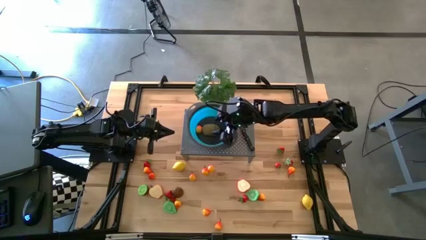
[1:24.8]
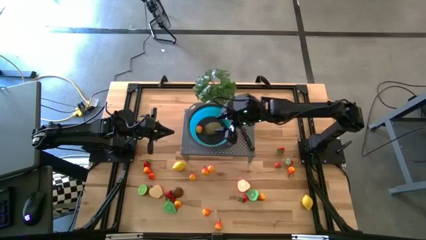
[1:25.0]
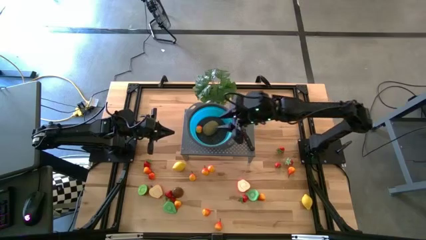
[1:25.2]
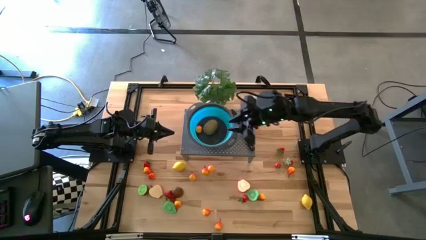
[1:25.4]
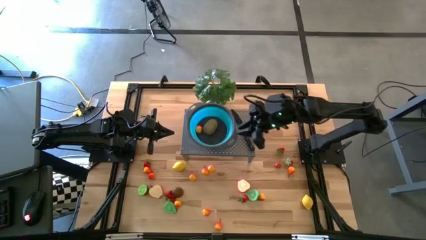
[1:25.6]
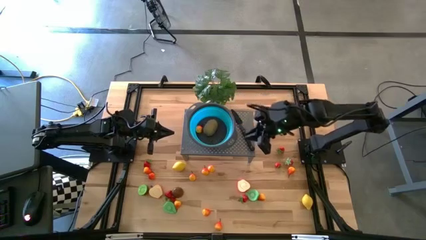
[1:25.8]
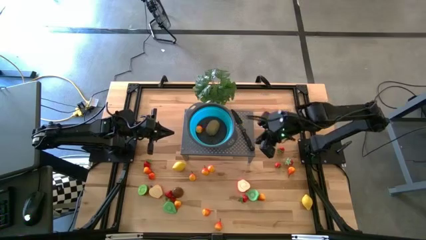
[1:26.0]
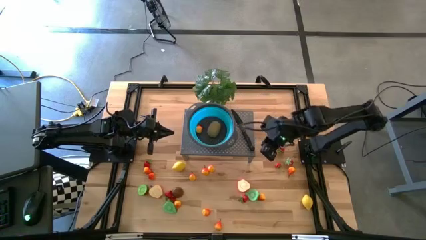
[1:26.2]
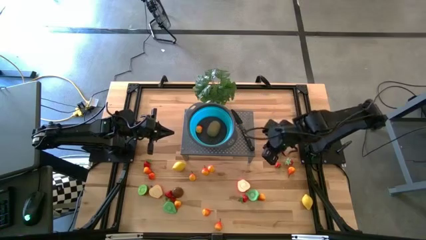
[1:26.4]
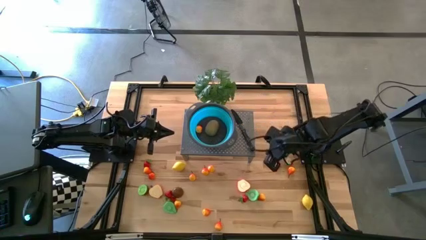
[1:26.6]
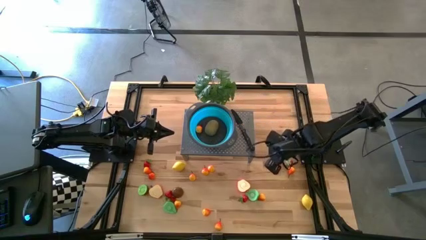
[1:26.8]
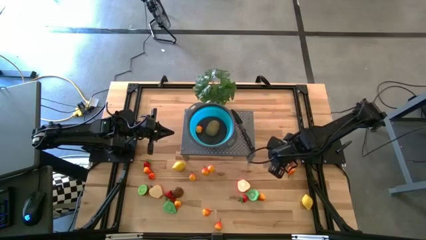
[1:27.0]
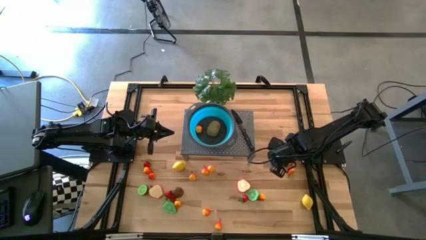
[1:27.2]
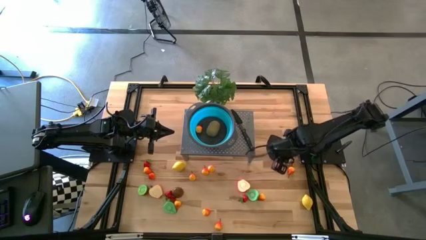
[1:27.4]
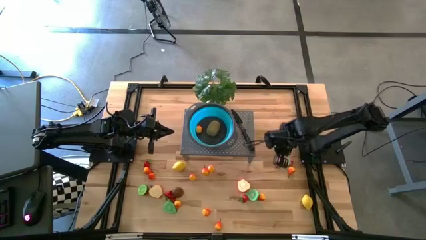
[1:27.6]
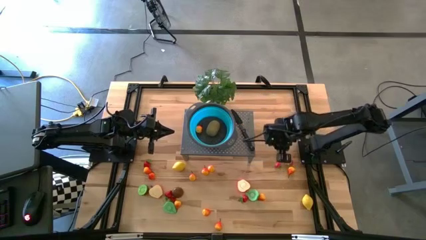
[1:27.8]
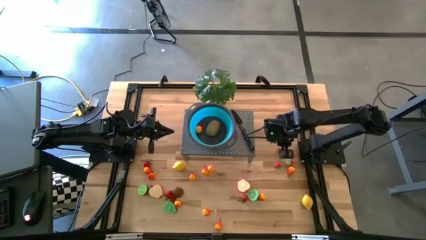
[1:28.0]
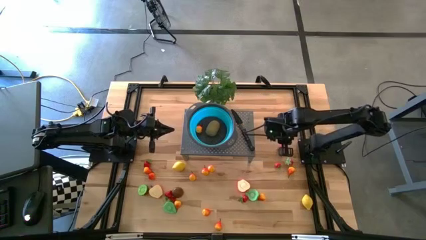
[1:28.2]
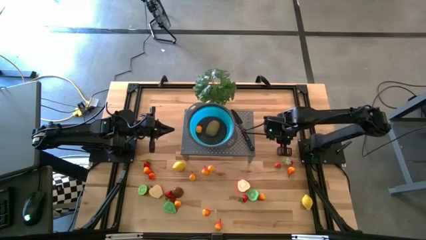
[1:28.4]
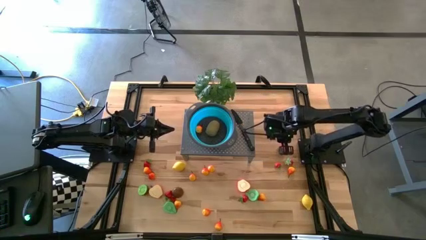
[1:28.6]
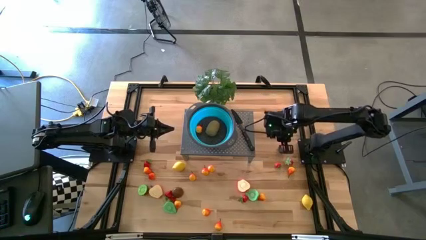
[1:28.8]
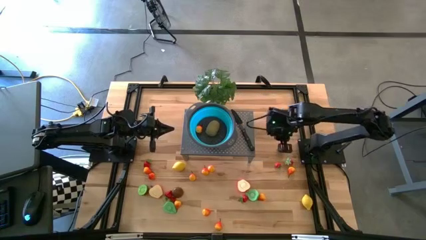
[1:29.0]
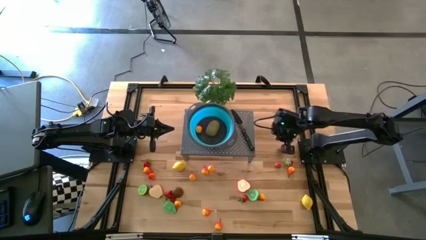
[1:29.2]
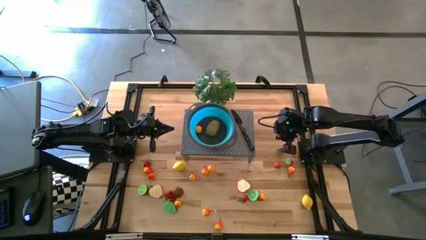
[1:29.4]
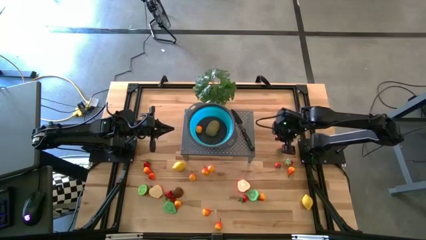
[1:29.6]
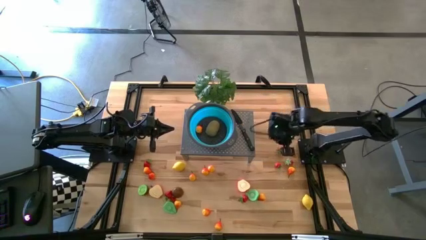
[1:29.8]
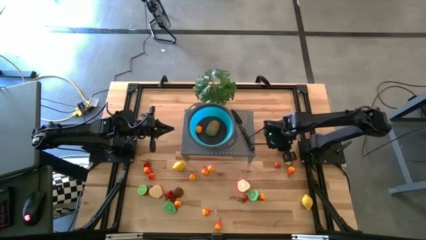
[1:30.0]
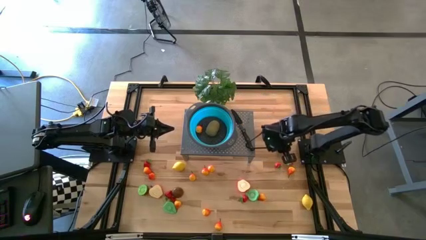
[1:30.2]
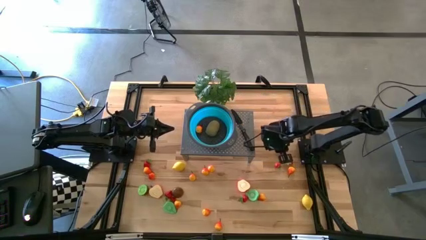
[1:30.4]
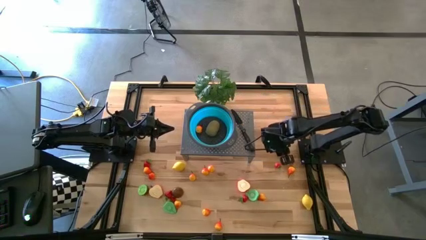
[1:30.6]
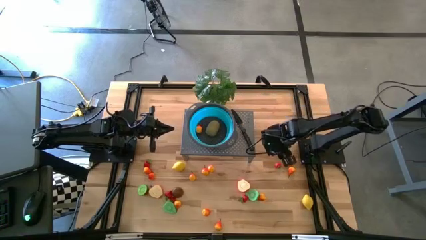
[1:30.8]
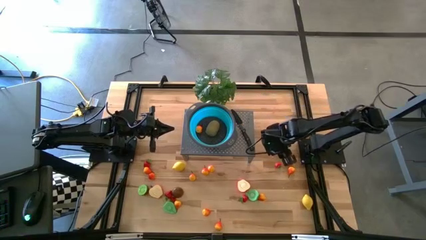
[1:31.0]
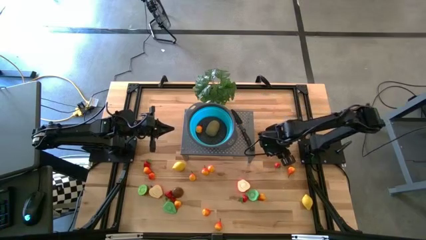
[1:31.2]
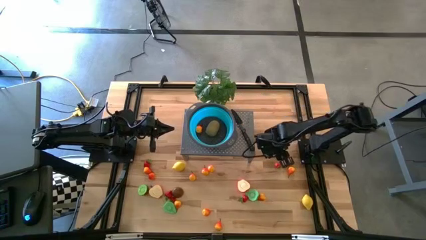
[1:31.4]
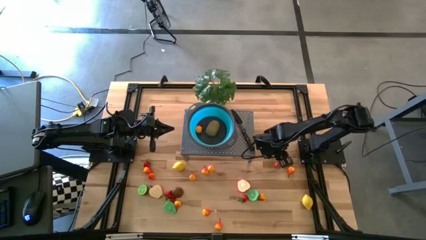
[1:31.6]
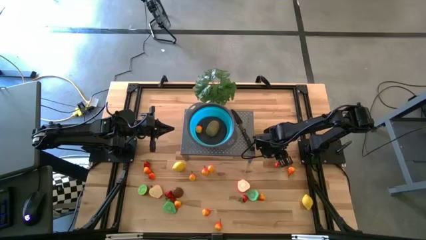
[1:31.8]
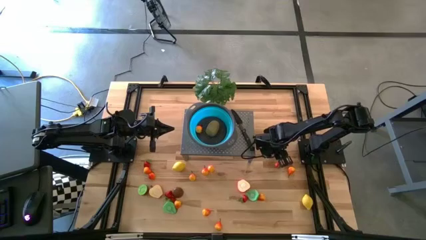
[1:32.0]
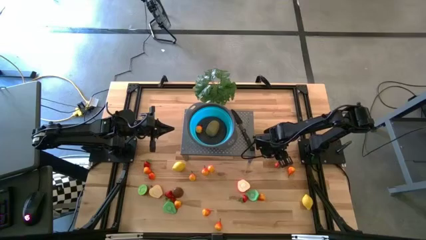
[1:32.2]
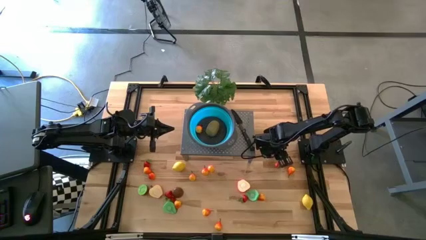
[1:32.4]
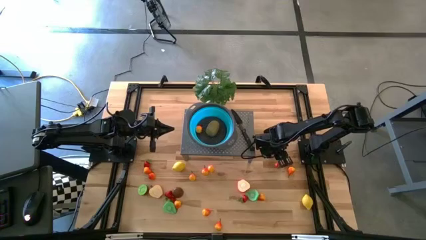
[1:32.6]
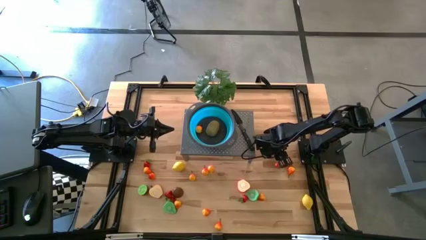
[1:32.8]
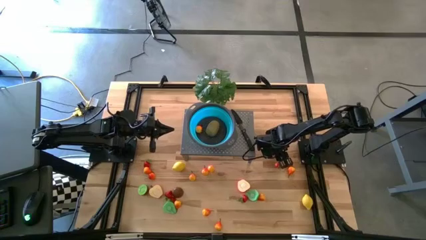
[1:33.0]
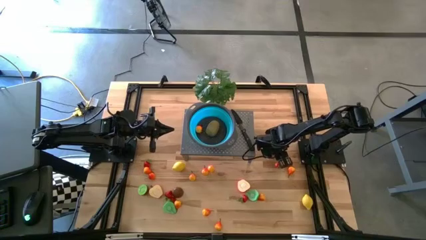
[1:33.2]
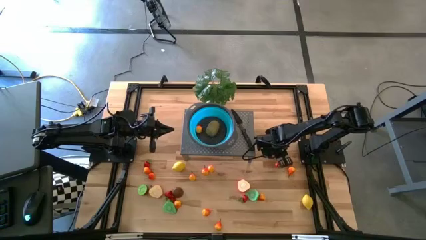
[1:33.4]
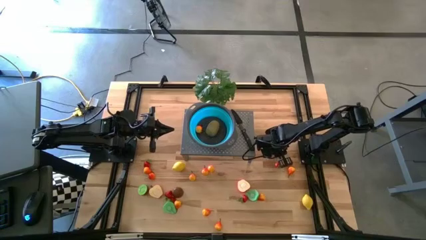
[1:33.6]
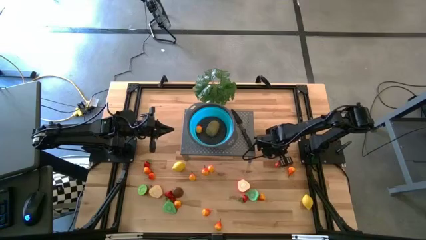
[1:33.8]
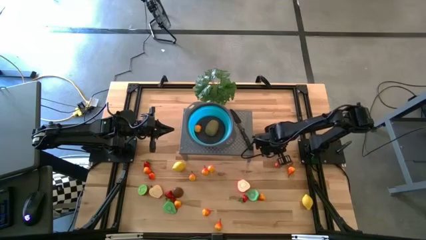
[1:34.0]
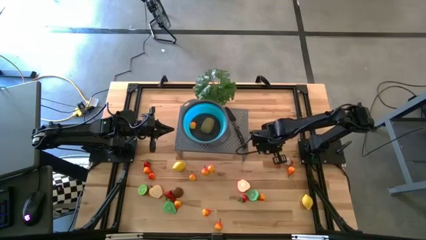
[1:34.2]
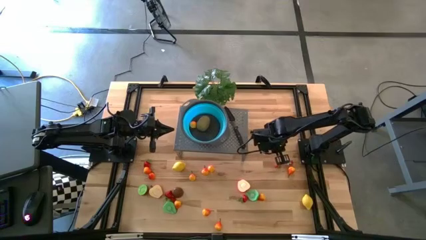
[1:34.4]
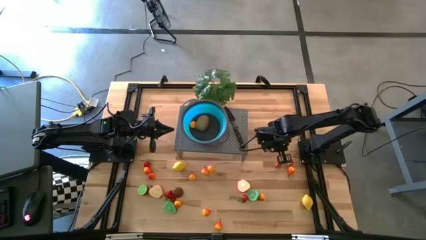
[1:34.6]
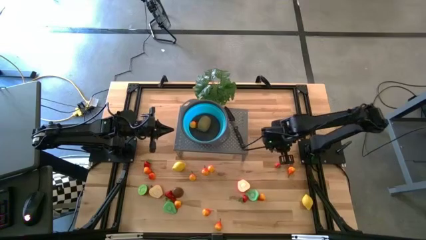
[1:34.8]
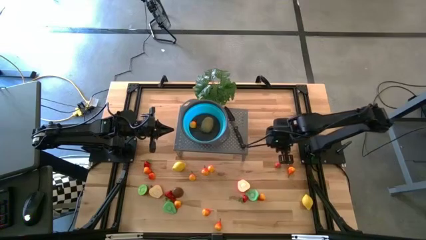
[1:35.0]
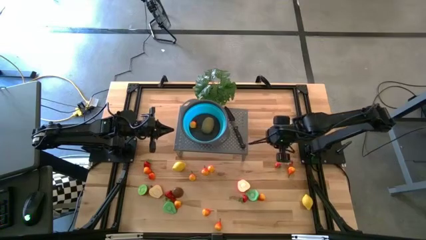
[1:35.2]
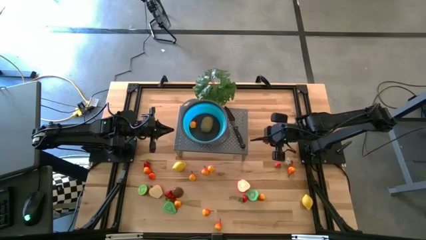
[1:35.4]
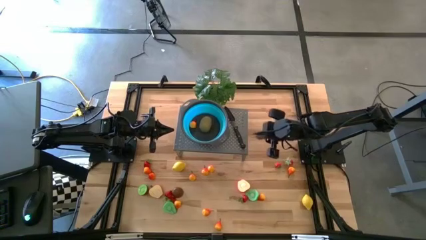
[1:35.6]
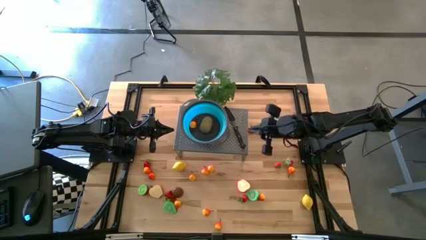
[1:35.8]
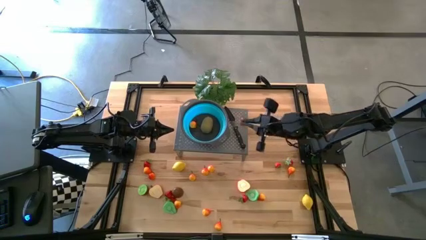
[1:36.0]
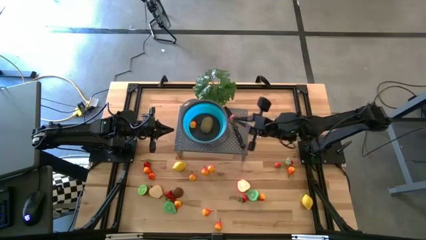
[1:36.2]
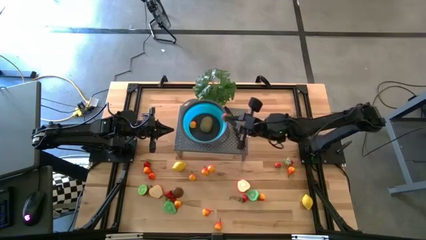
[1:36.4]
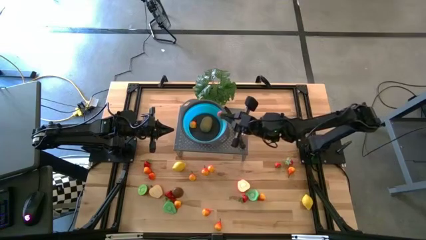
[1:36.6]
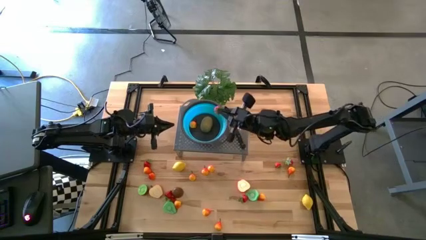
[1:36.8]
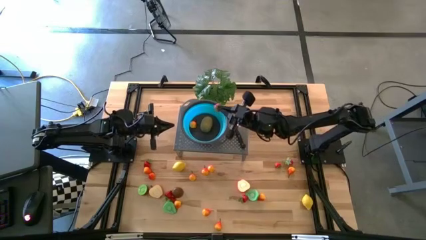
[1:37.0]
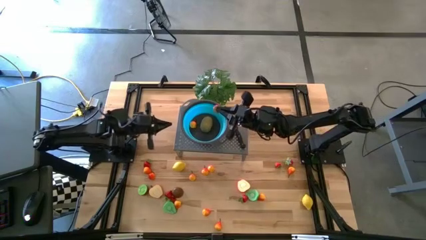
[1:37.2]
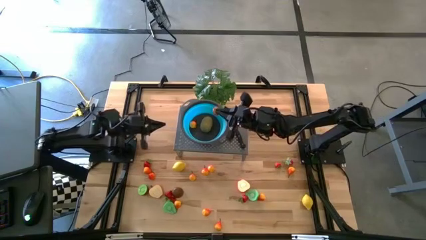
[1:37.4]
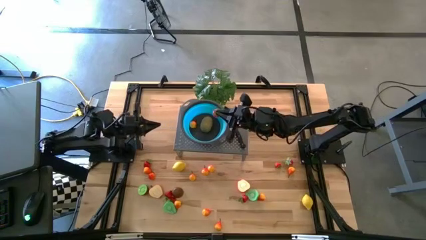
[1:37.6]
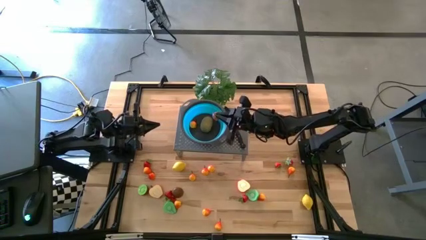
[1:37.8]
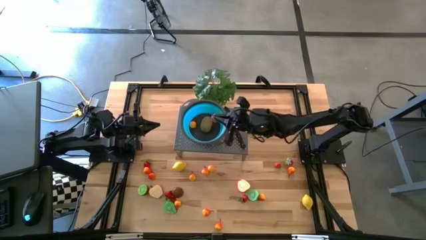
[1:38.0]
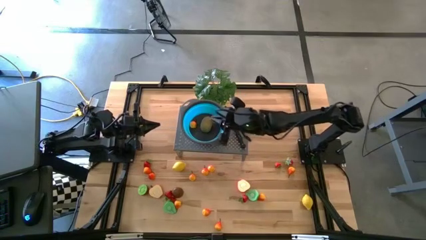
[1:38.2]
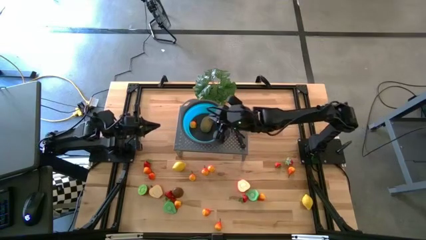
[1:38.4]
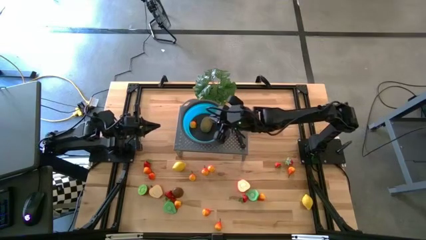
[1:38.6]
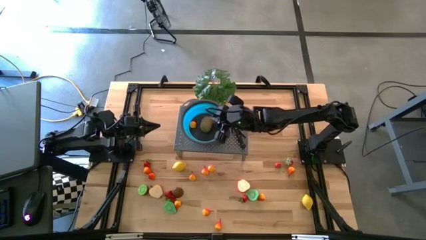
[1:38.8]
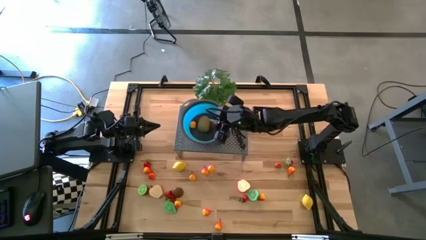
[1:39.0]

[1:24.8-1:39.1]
Task: Pick & Place Fruit
Put the strawberry into the blue strainer bowl on to the shelf

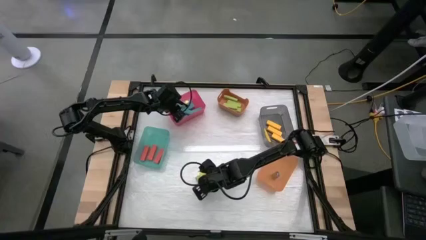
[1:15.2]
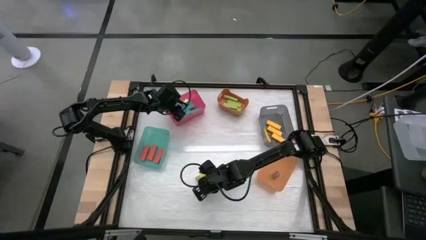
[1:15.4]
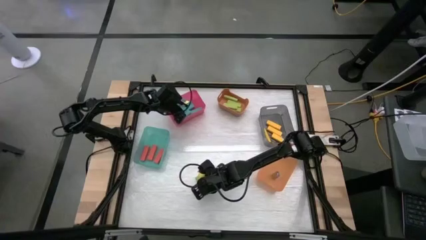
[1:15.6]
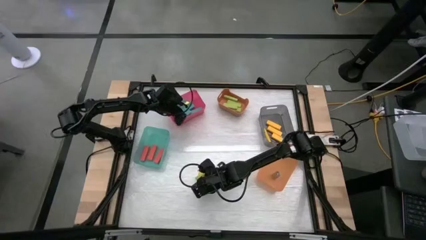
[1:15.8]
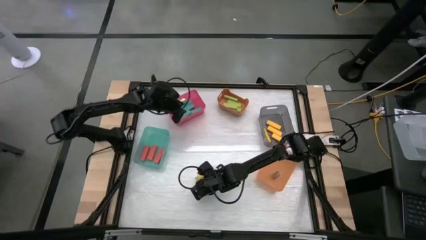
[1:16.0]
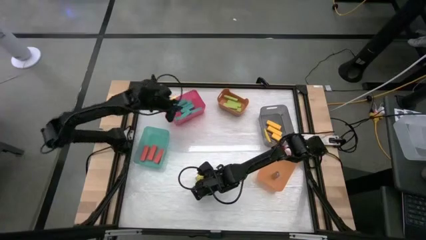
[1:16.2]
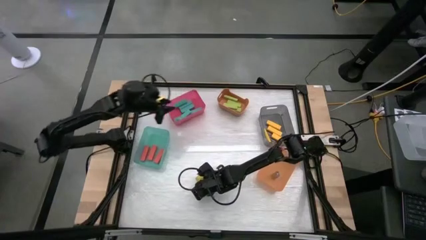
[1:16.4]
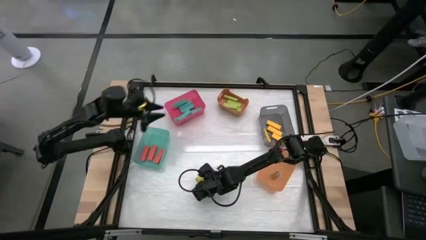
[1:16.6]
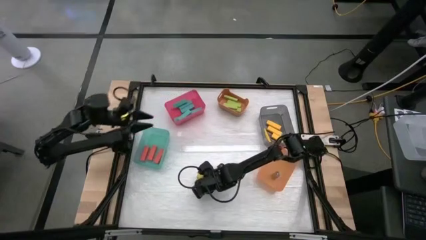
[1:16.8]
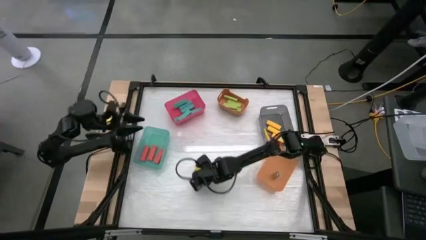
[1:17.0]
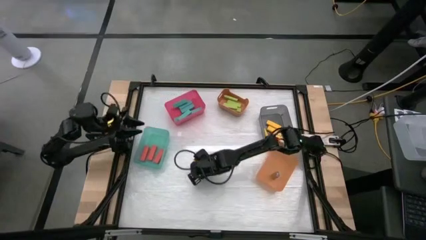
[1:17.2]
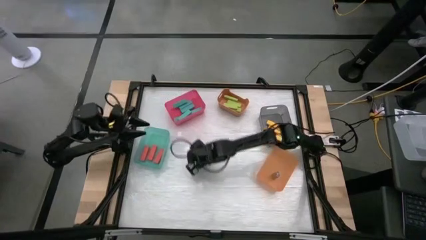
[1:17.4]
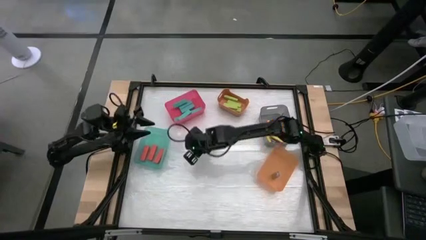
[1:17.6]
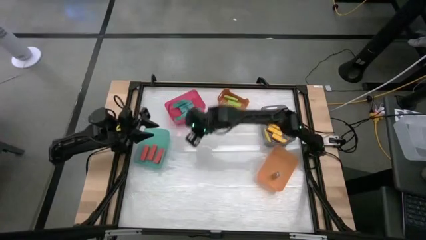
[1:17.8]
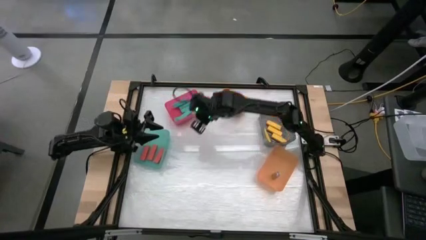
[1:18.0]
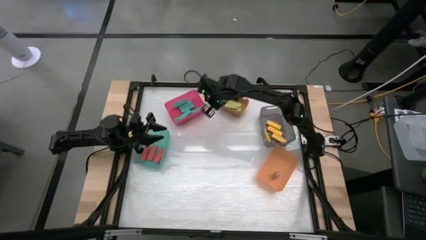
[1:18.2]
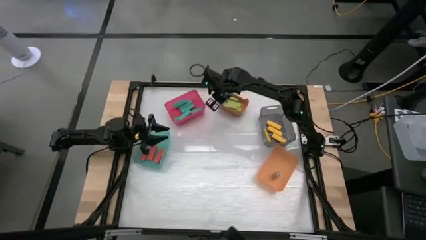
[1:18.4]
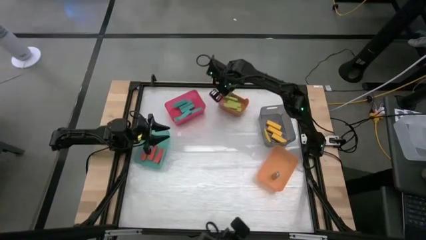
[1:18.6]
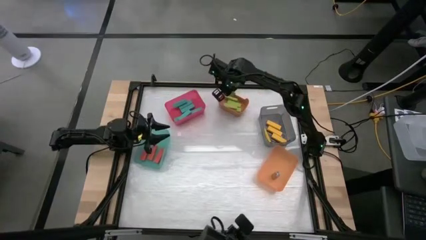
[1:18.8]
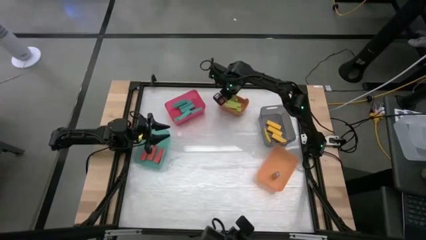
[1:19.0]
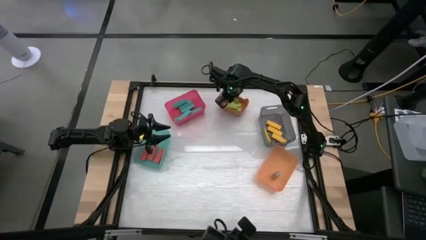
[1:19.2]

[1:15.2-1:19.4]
Task: Sort blocks
Put the green block into the orange bin
